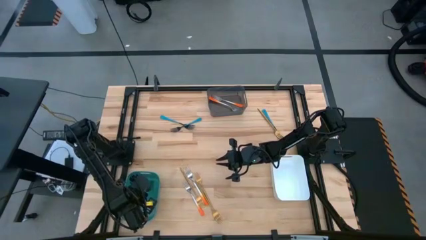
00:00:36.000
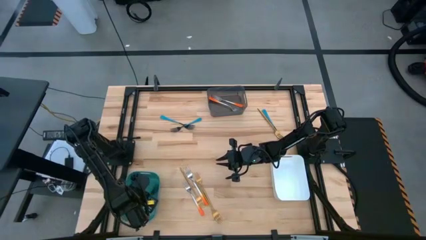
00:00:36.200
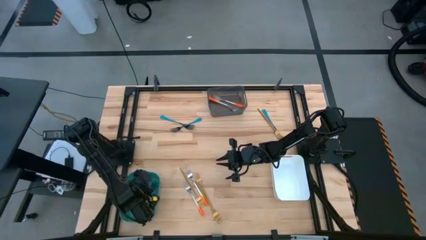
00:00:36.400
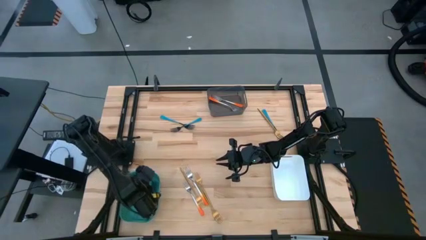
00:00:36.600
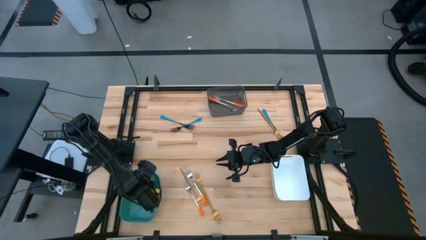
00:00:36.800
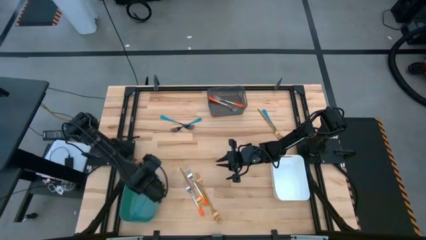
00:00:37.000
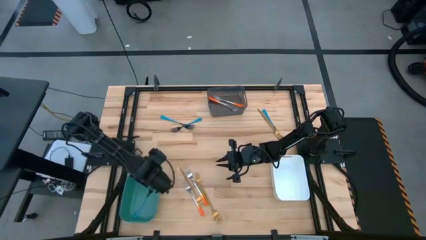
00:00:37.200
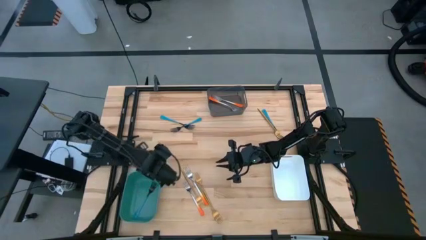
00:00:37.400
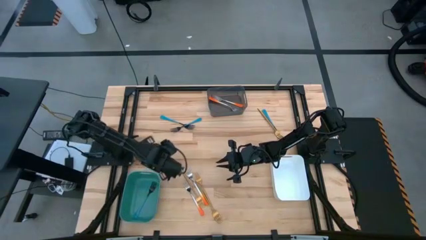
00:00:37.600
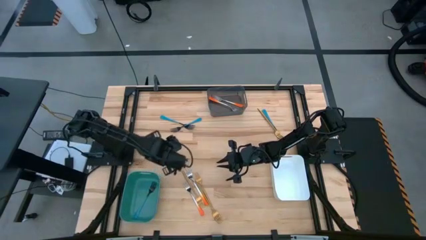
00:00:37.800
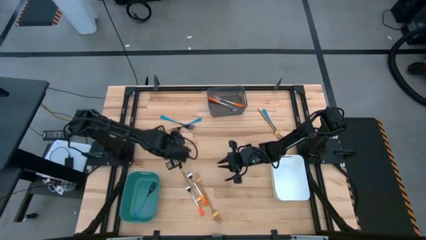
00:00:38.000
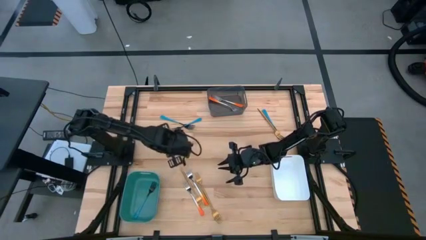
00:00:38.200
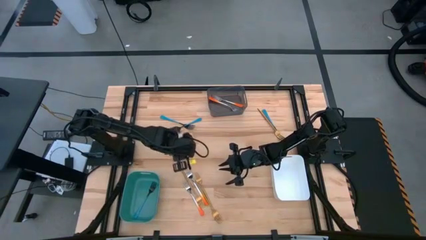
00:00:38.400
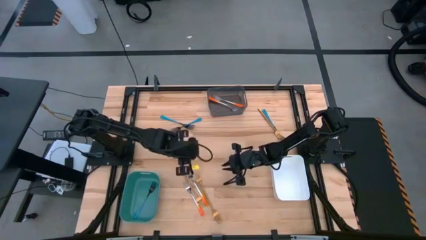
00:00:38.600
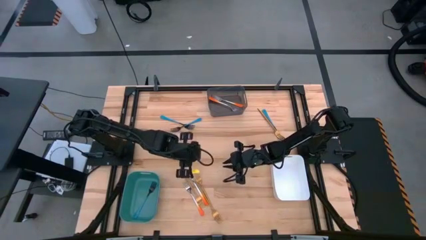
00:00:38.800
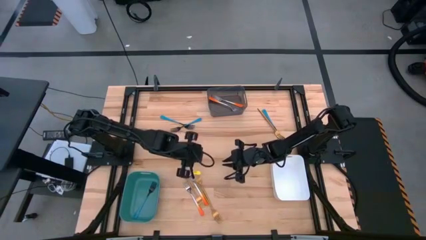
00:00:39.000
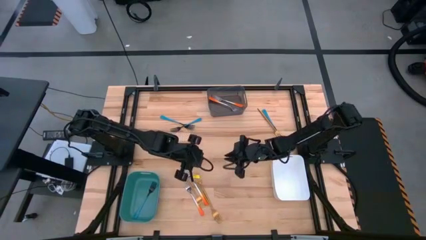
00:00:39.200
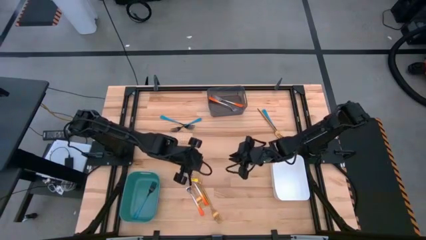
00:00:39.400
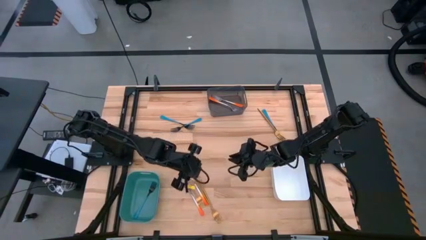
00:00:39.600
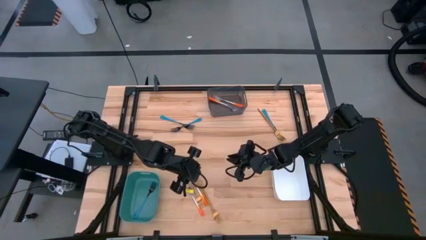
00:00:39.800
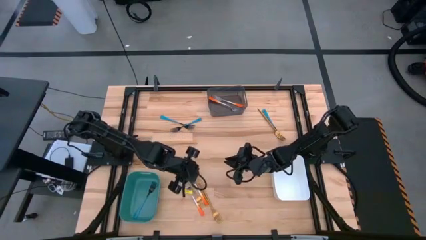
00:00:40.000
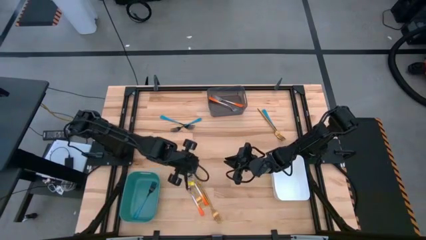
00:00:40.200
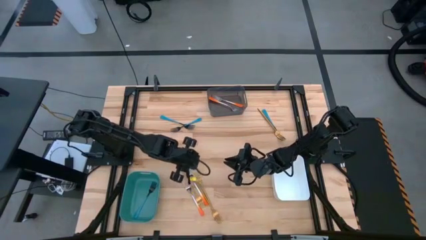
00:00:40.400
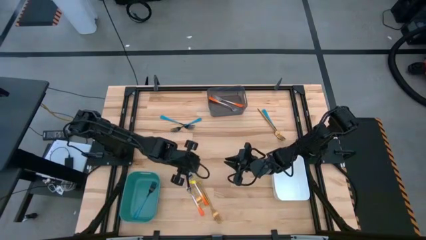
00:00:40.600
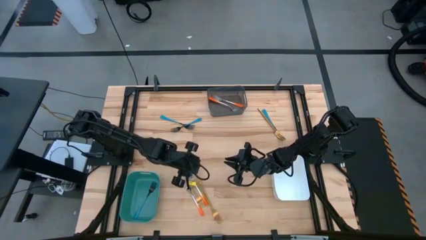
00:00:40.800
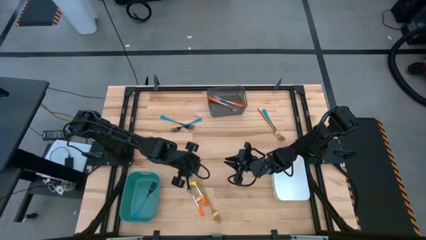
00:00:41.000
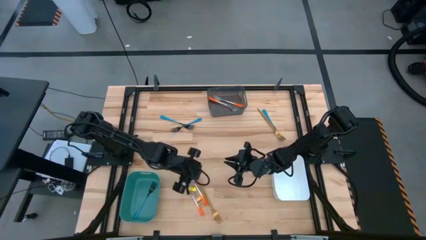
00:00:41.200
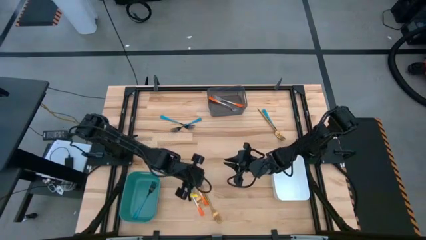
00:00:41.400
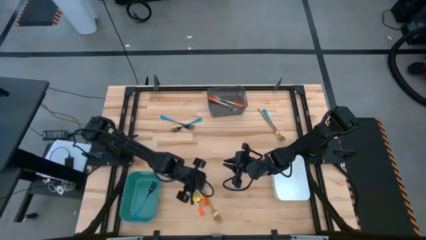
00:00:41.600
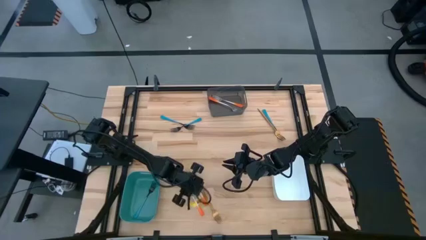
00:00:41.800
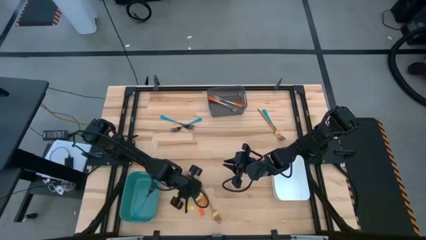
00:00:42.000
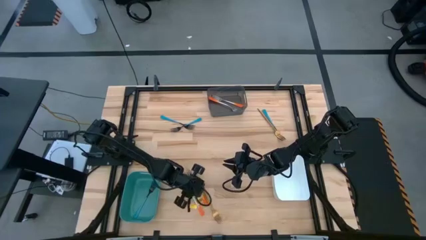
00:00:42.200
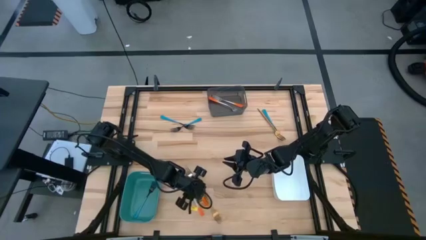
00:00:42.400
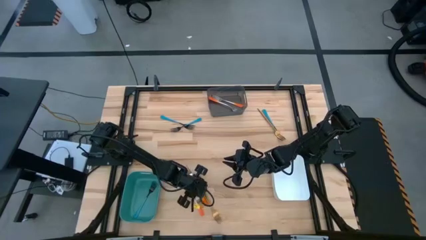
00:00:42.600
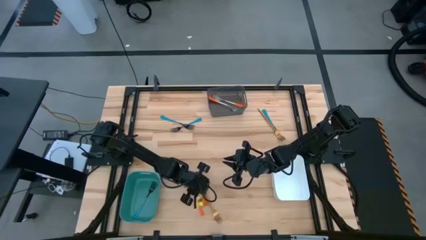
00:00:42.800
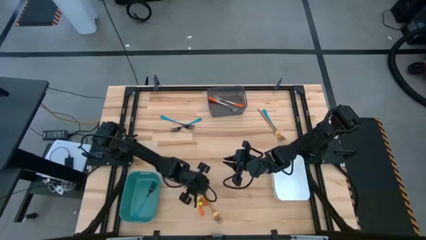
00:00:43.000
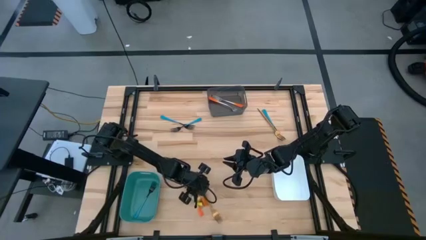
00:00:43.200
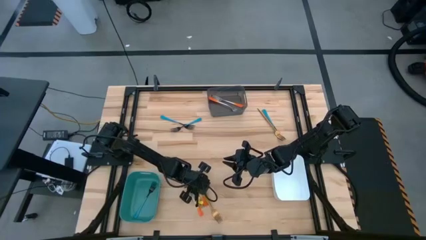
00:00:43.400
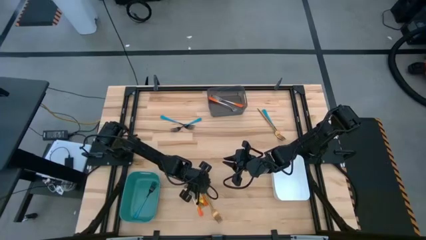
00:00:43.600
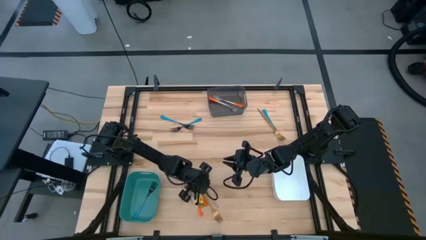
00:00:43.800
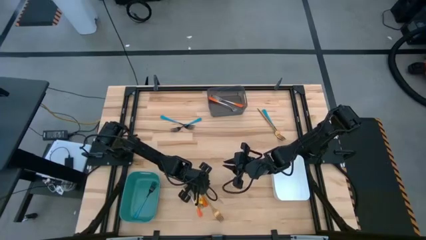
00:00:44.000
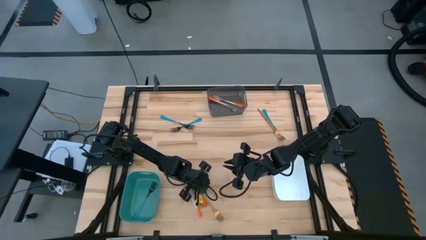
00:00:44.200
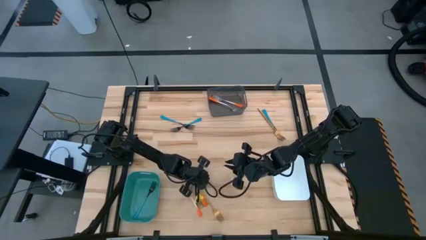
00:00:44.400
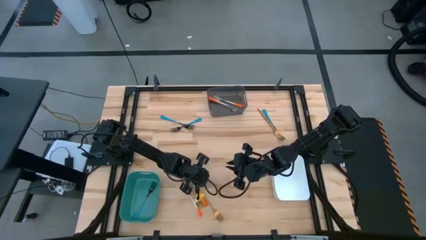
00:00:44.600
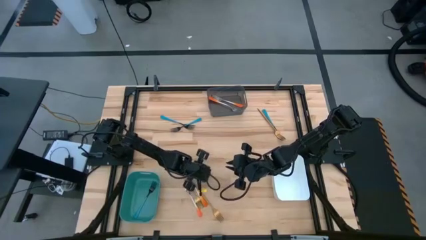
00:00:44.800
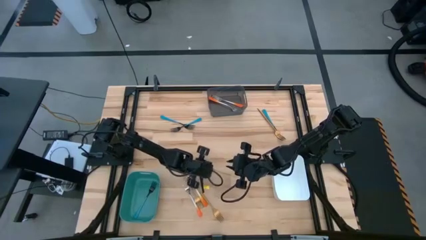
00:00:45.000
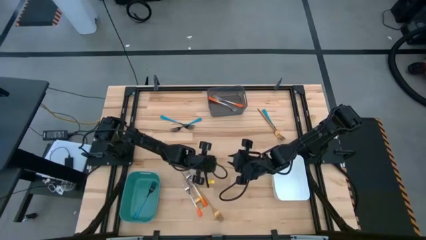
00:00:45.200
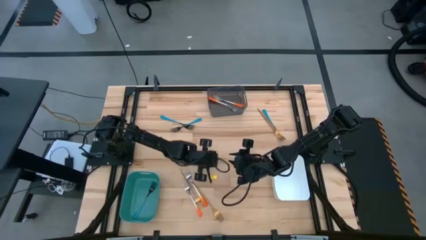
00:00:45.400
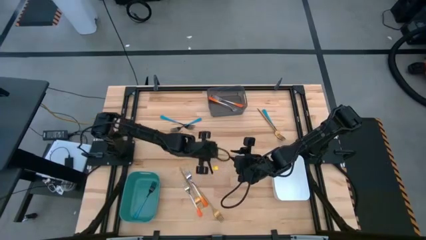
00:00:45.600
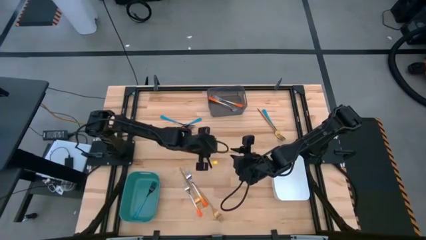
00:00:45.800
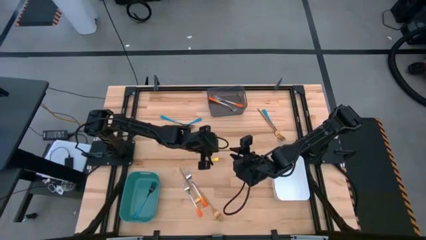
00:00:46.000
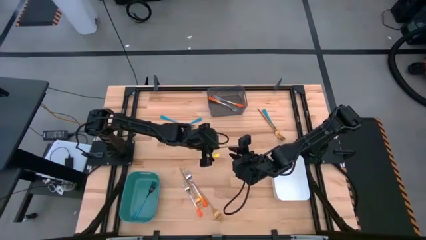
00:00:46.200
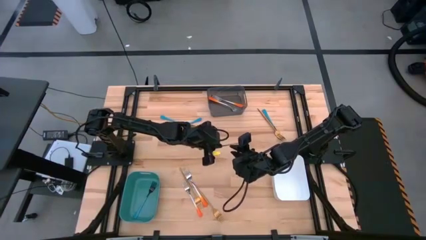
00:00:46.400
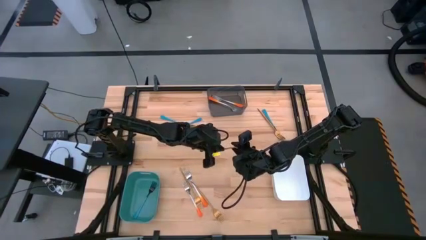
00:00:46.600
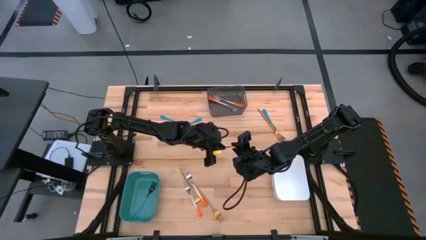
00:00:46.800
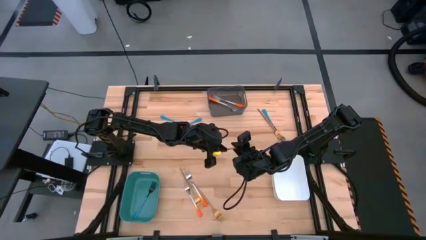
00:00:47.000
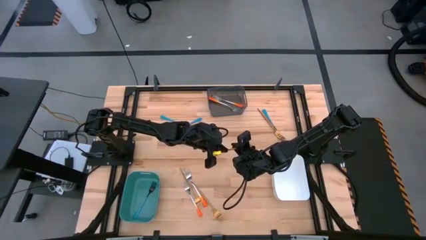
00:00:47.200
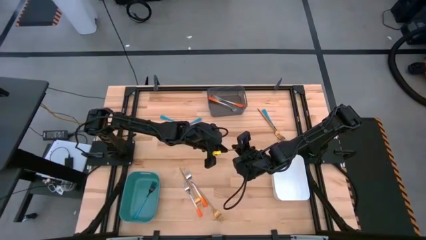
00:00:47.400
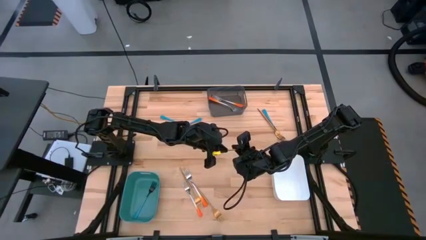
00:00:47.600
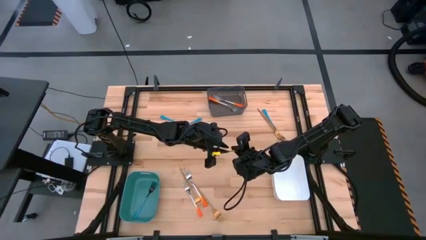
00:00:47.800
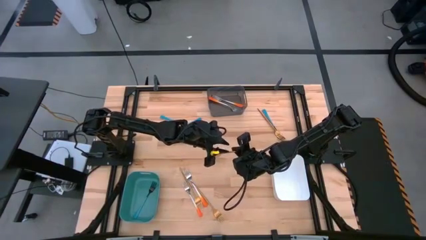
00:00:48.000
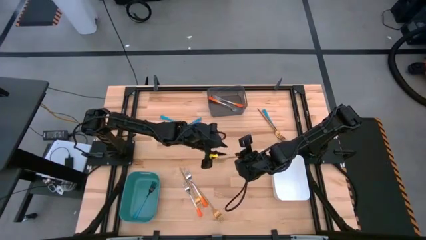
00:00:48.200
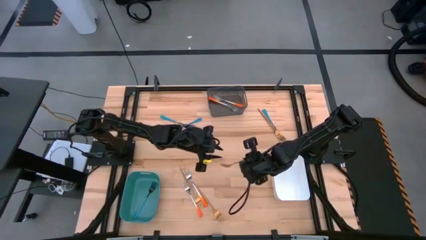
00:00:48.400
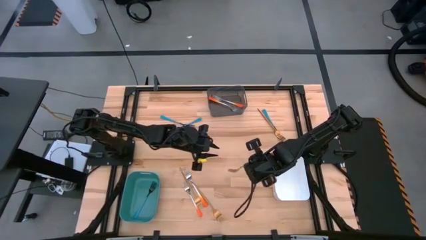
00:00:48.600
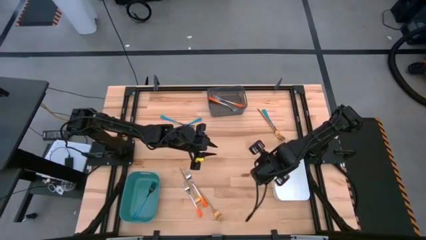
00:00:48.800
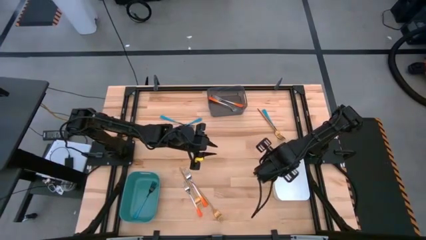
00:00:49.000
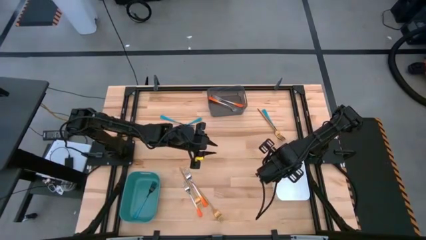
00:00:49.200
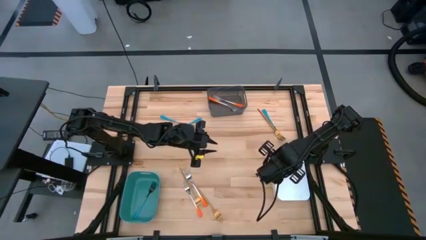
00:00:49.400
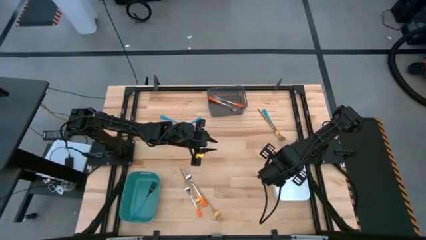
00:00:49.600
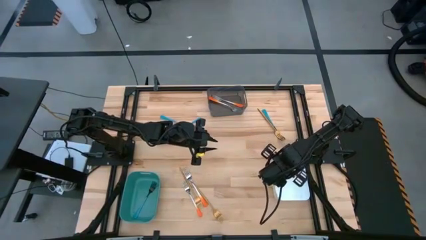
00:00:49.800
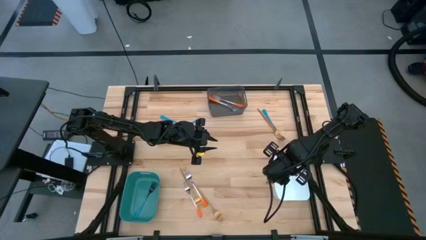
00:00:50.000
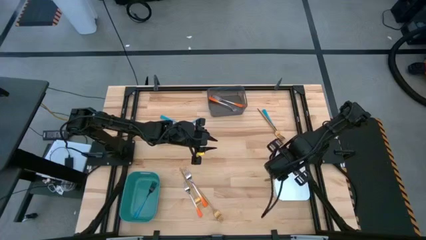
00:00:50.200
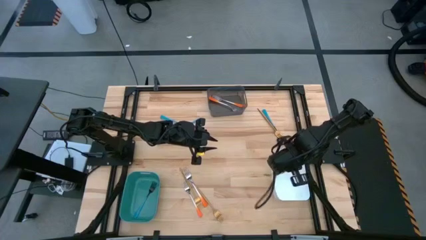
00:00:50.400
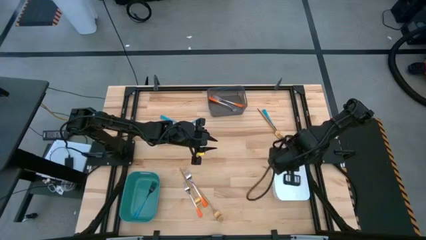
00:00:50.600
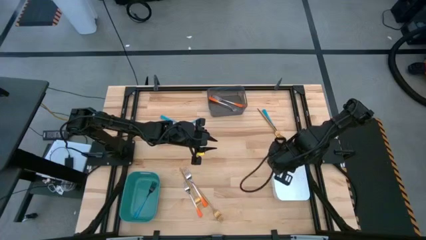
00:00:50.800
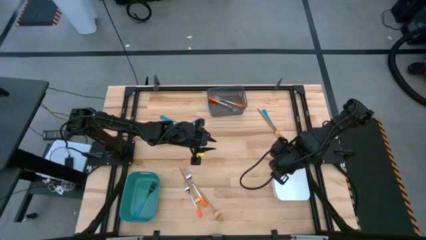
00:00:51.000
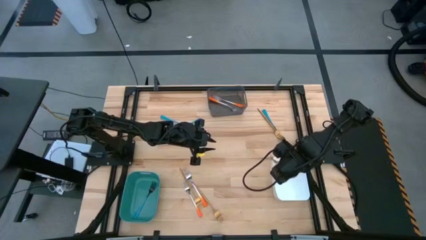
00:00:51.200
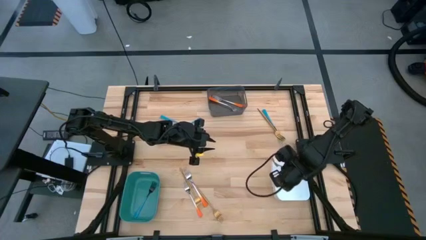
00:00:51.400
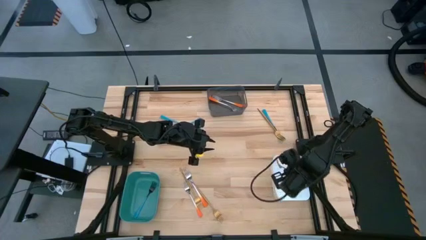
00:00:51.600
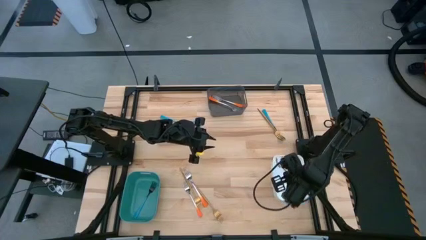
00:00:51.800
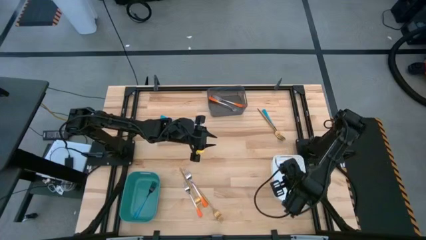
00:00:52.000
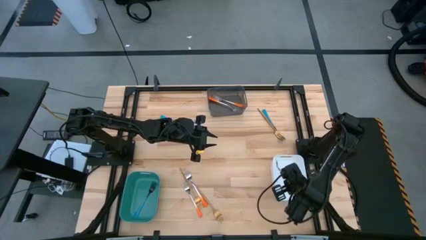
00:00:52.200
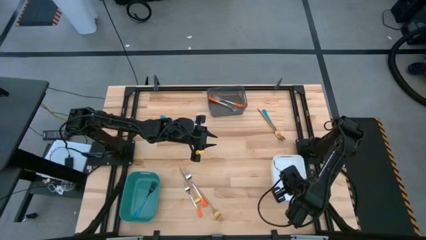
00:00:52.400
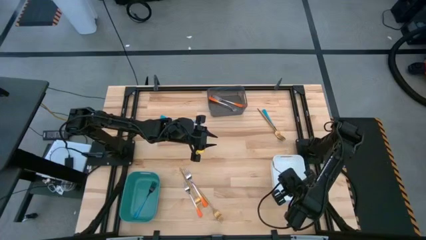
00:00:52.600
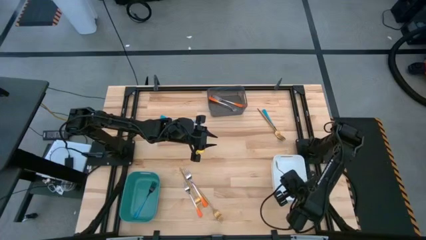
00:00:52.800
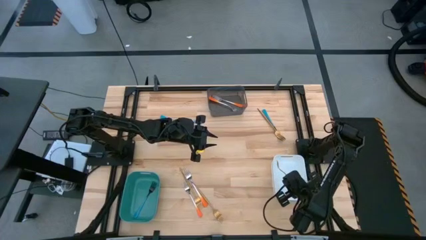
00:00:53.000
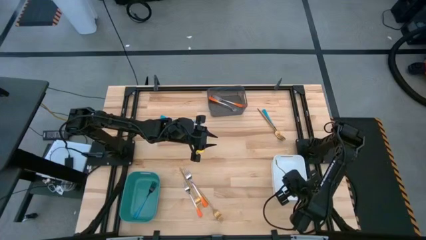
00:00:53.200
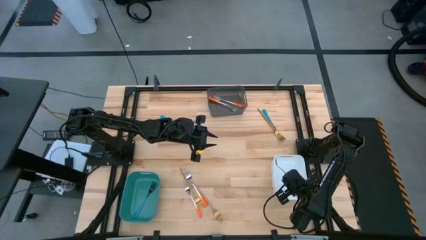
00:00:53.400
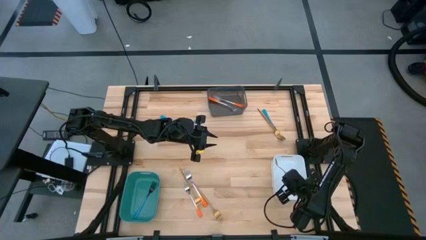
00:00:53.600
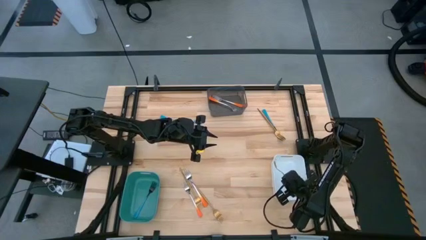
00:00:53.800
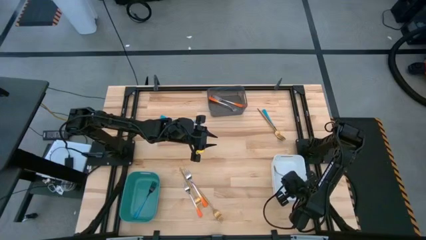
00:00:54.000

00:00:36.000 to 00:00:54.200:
Task: Sort silverware by color (type)
Put the gold fork into the white bin
